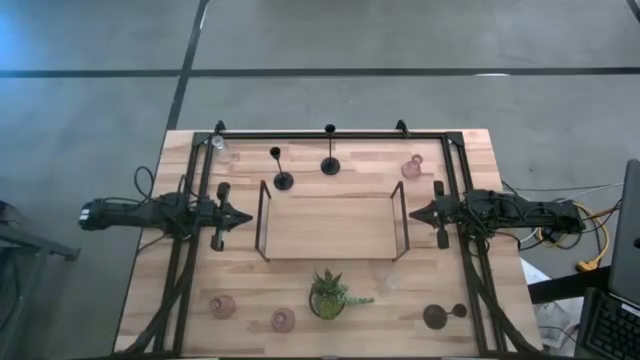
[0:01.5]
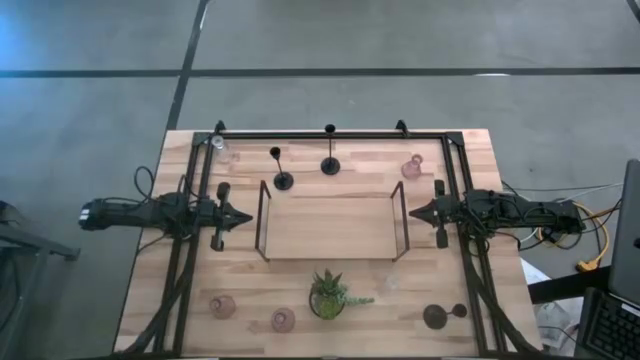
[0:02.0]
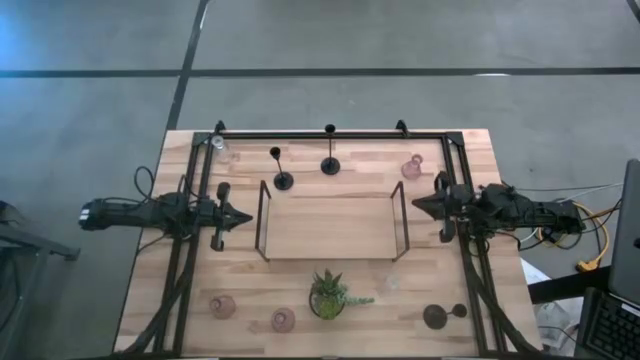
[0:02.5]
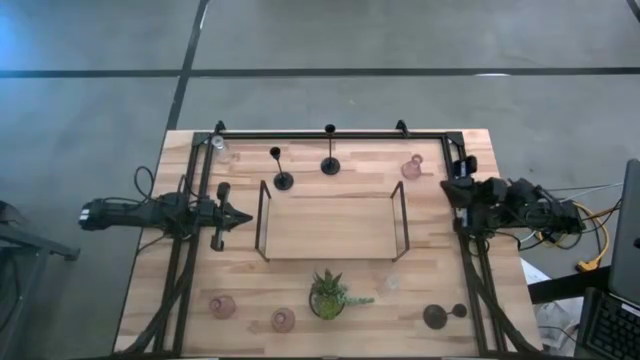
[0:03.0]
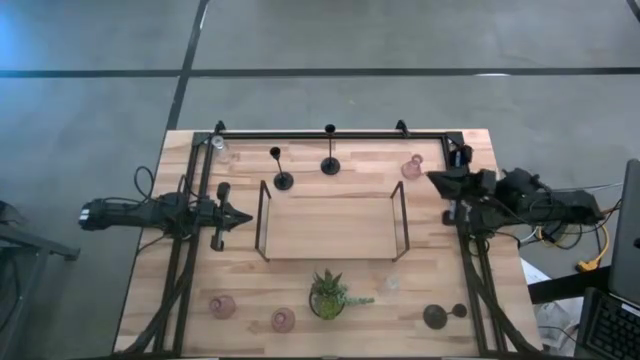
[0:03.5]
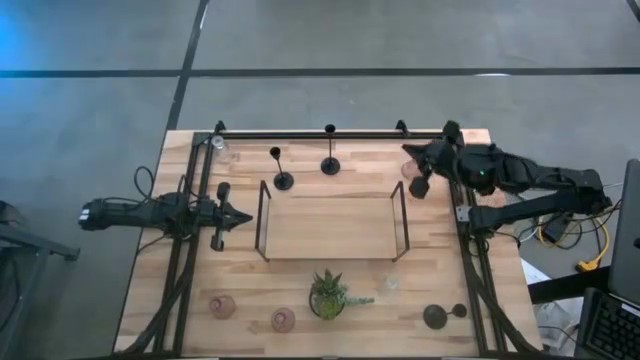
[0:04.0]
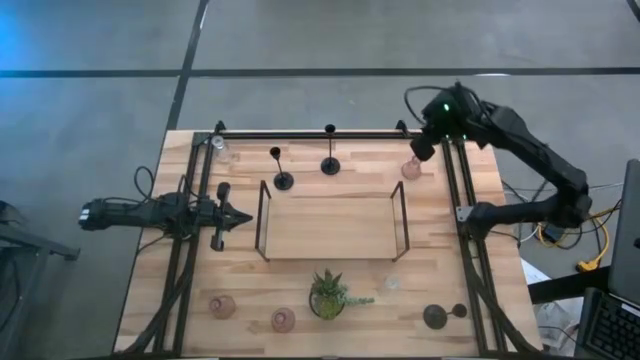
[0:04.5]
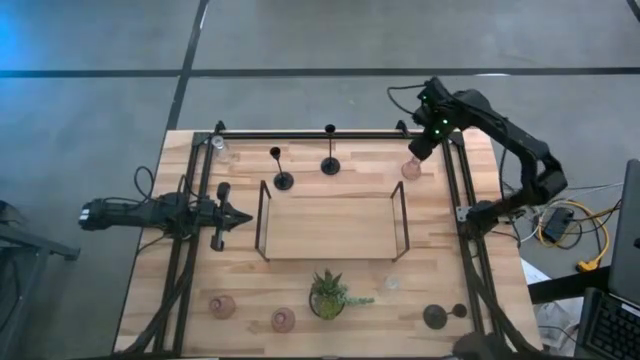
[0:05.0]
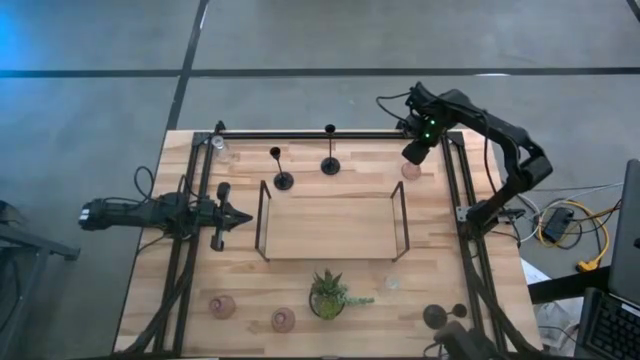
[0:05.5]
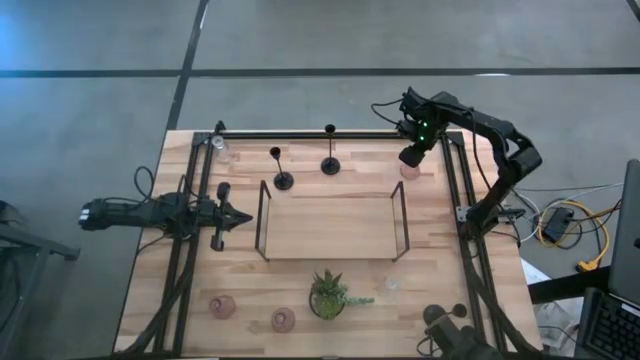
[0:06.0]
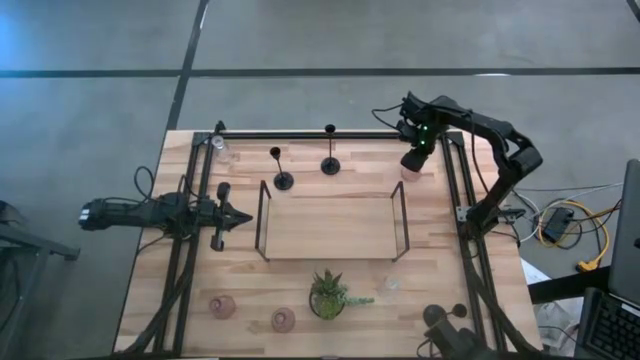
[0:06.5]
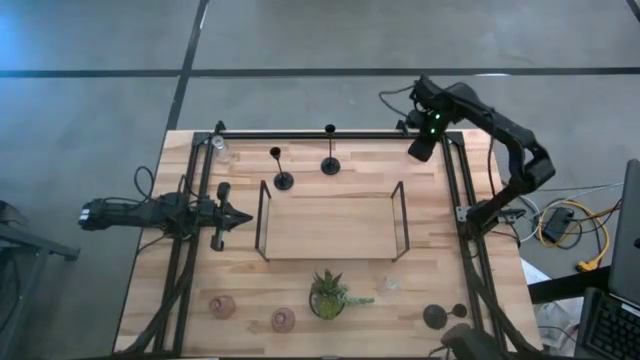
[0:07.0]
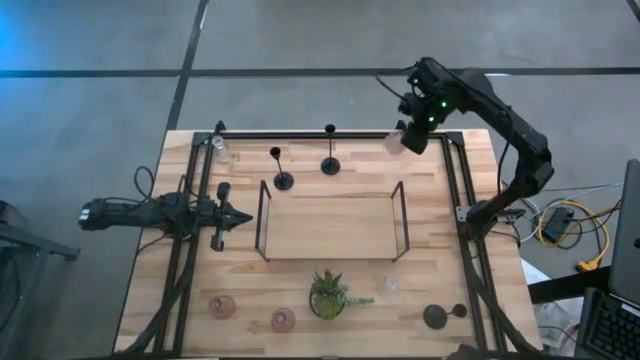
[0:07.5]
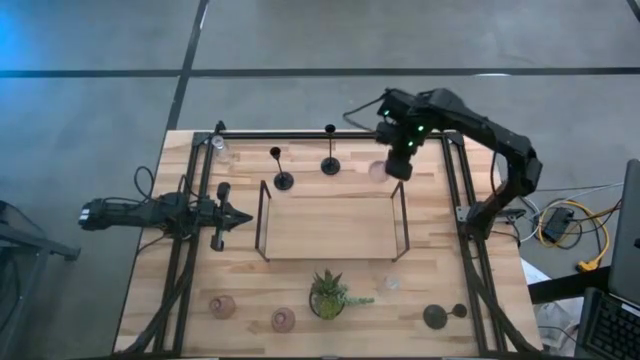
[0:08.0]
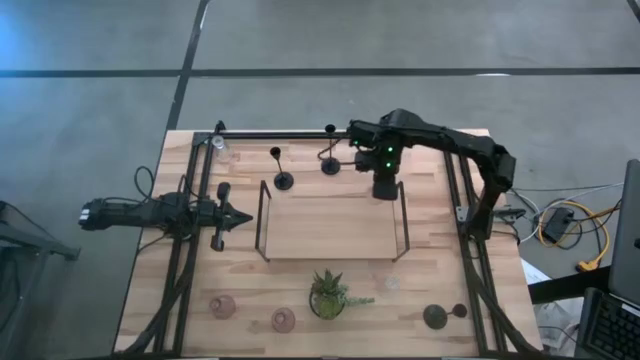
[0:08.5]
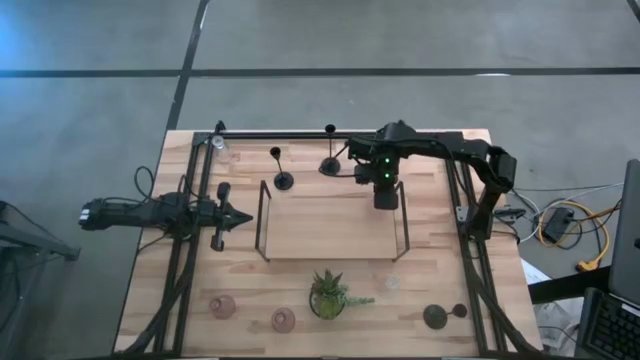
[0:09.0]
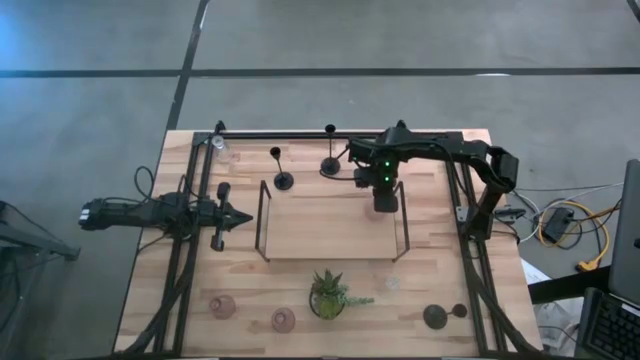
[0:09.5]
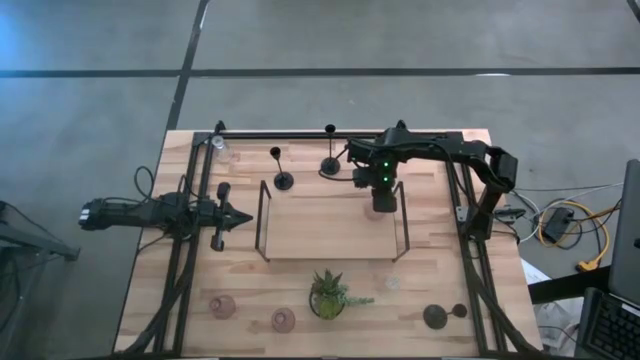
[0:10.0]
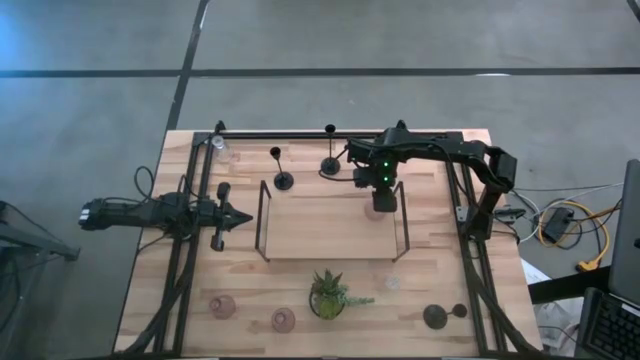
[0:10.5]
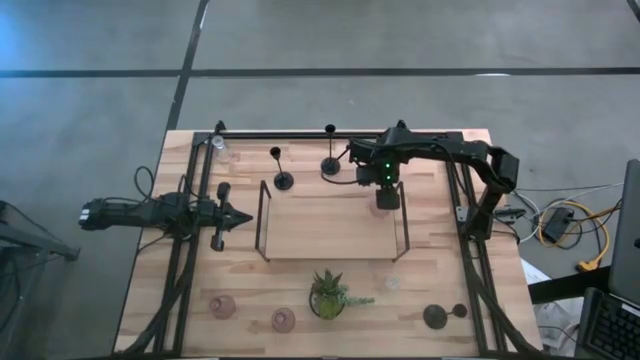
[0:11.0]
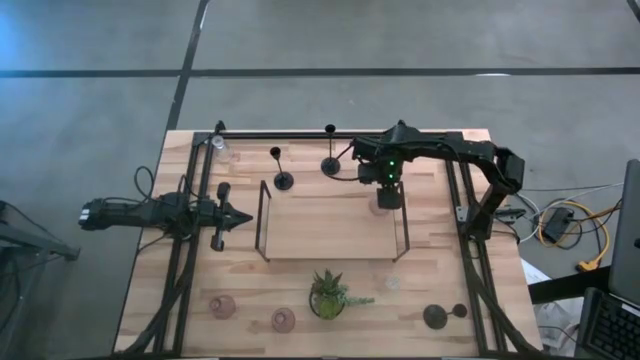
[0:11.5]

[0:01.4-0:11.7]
Task: Pick & Place candle stick holders
Put the top pink candle holder on the shelf

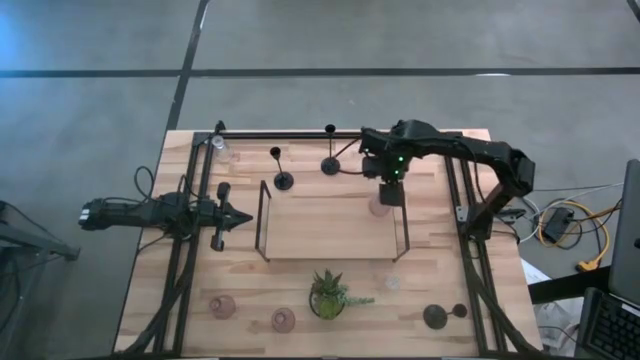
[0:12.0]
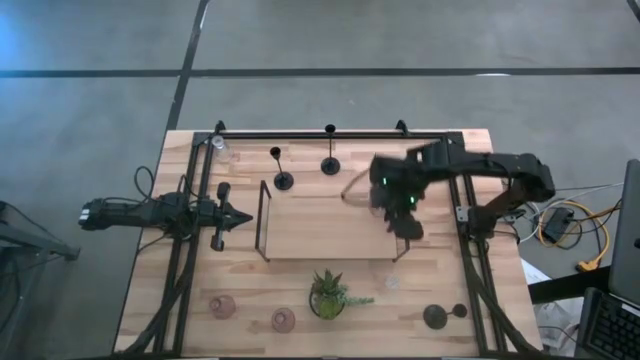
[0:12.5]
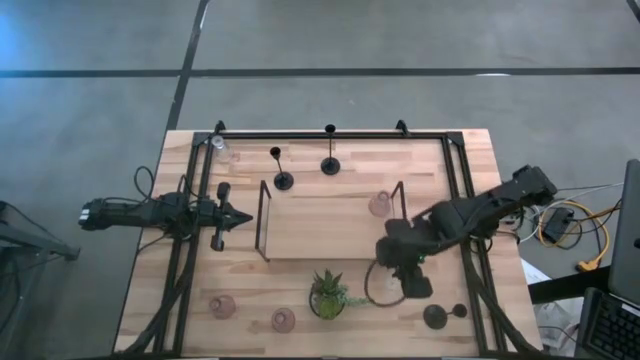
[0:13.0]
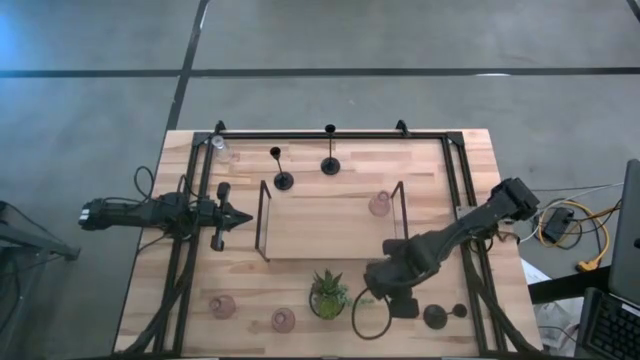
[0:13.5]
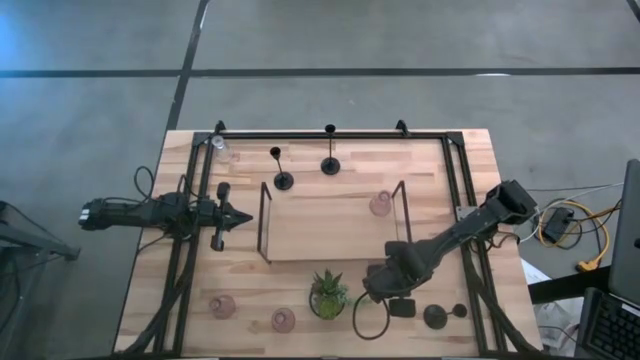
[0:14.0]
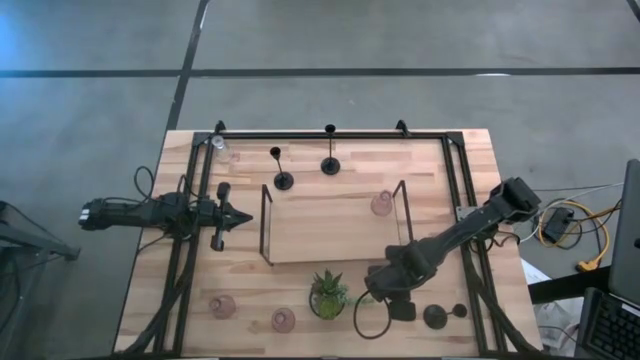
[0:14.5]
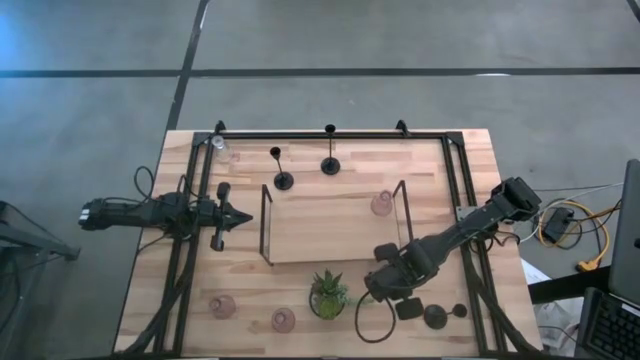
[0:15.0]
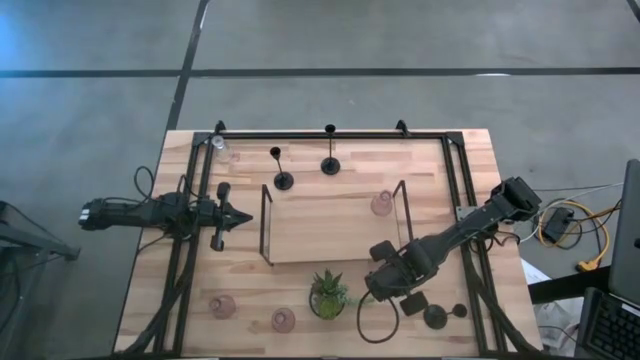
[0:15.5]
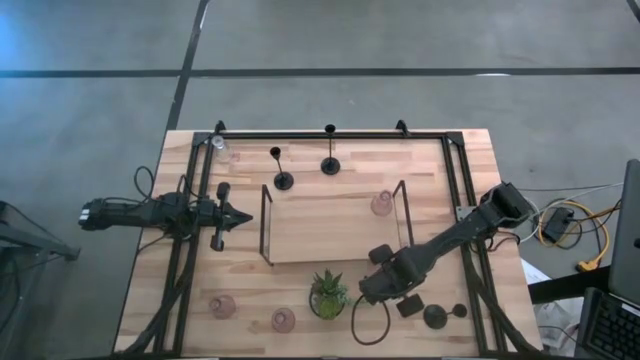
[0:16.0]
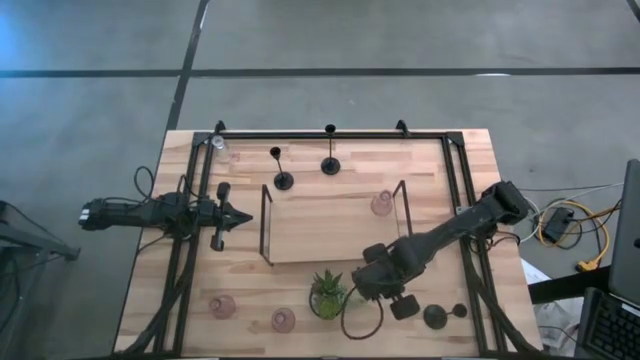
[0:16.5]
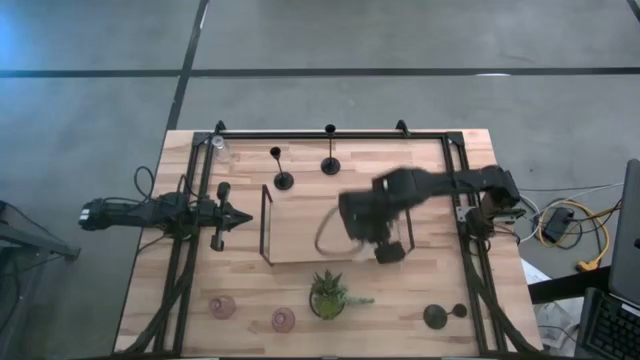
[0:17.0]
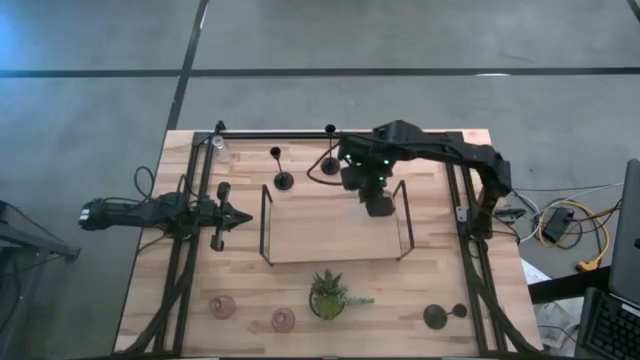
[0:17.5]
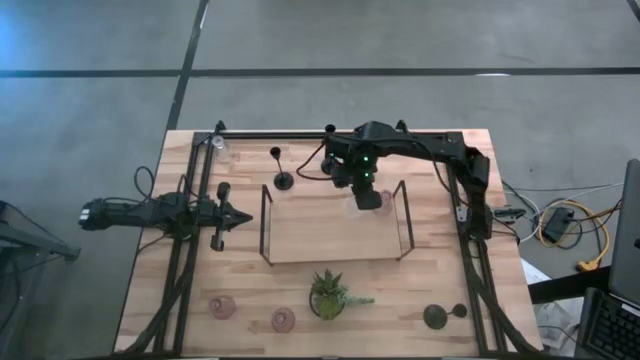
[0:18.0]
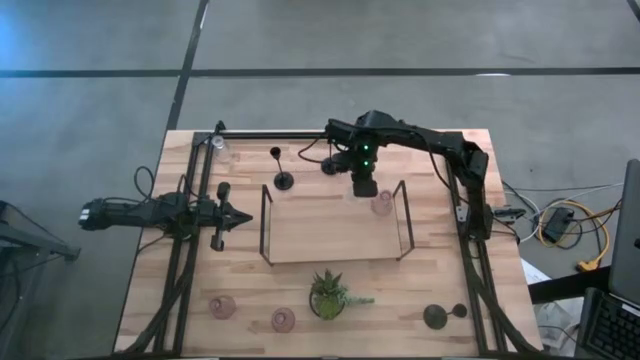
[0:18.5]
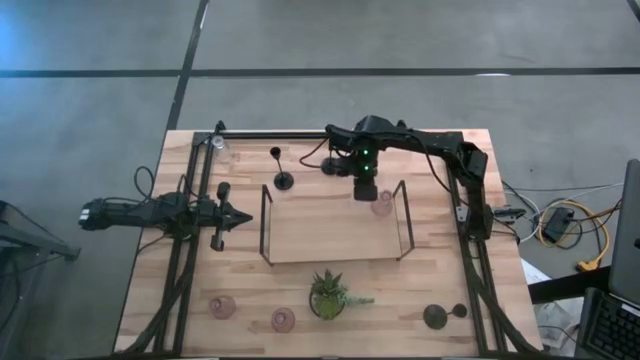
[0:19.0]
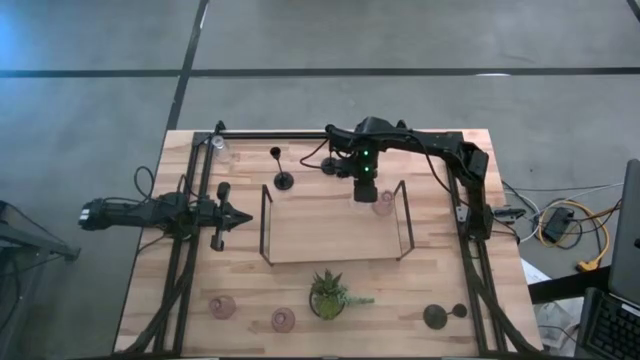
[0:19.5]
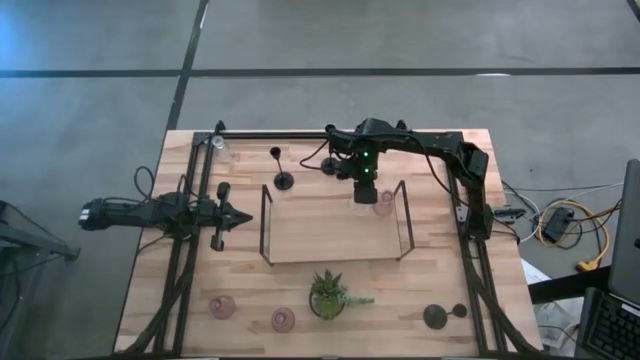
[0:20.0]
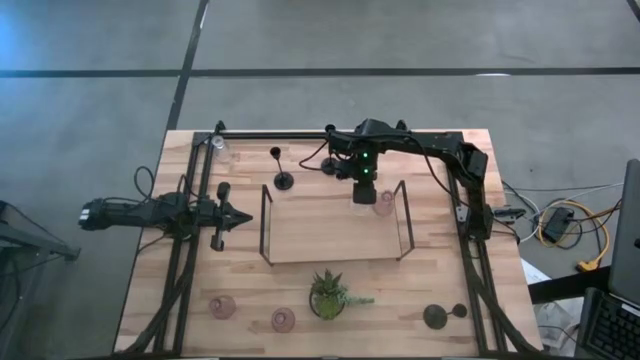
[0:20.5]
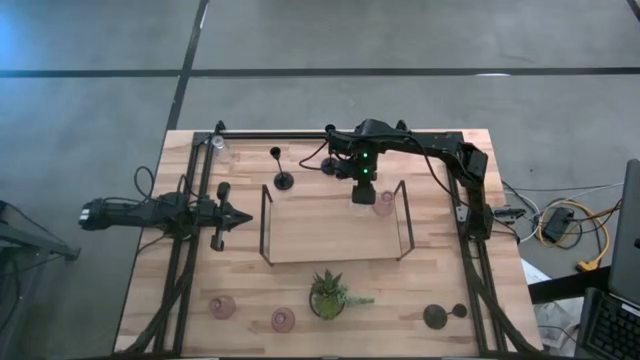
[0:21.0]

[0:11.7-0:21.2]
Put the bottom transparent candle holder on the shelf

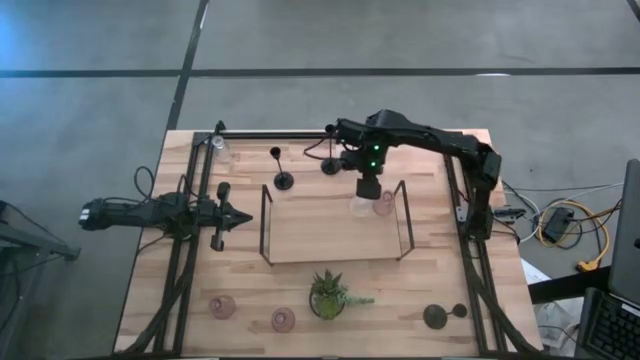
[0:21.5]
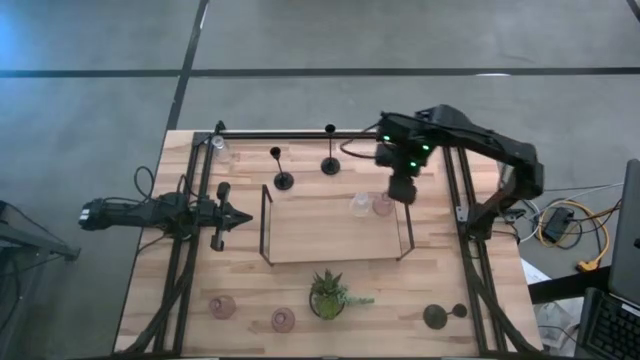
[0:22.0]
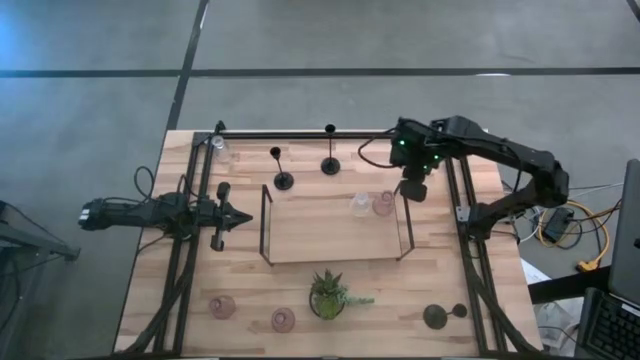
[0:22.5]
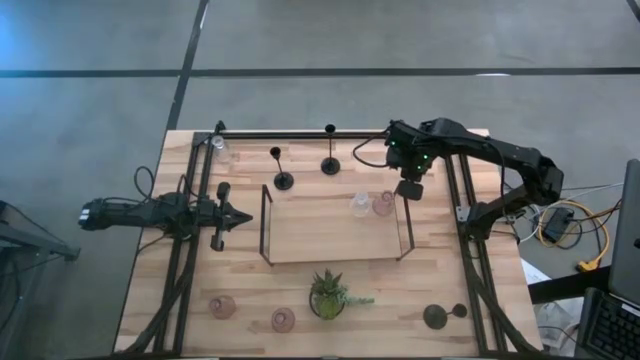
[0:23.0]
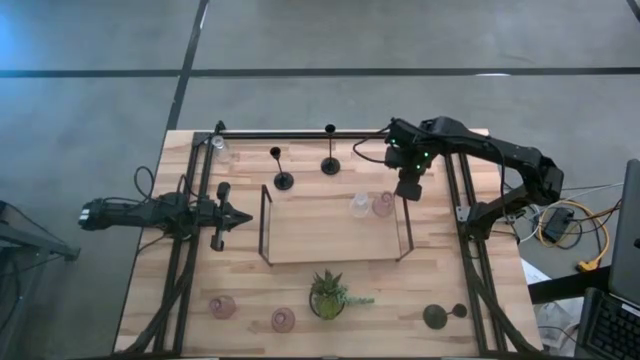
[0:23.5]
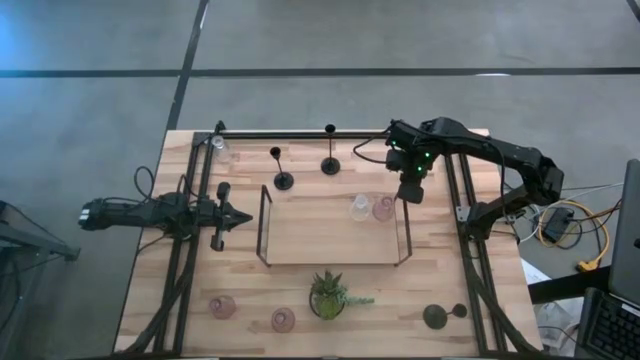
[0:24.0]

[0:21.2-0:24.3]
Adjust the shelf
